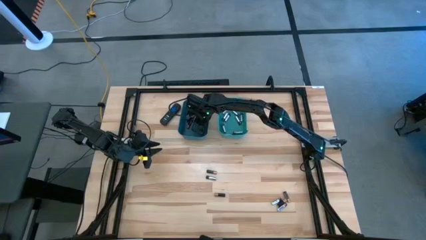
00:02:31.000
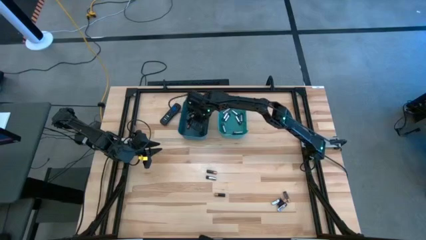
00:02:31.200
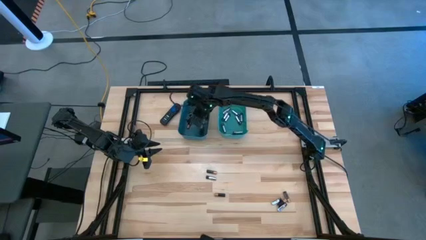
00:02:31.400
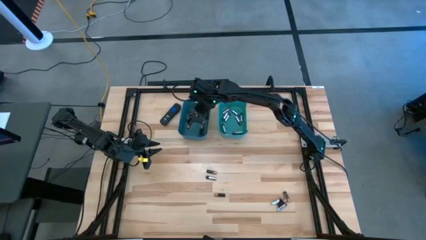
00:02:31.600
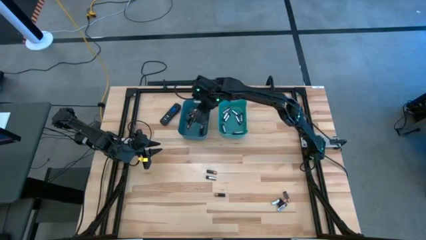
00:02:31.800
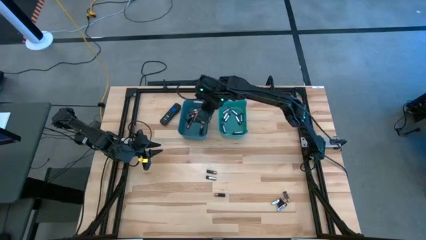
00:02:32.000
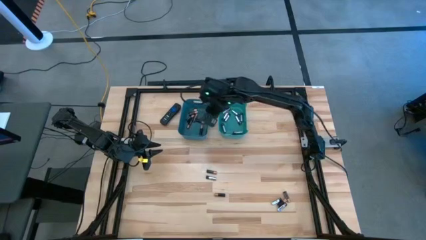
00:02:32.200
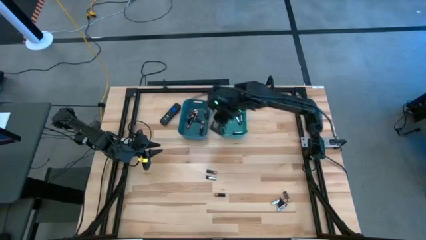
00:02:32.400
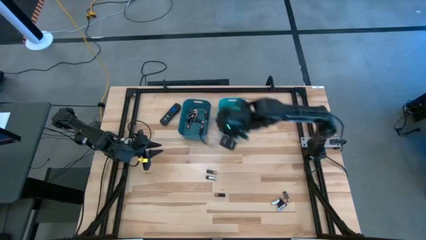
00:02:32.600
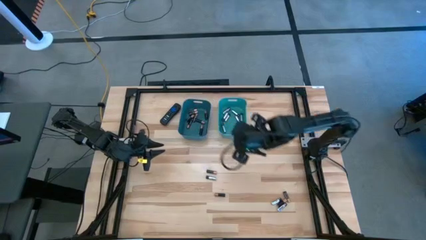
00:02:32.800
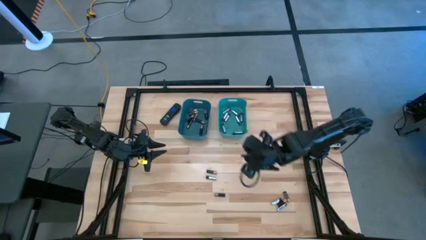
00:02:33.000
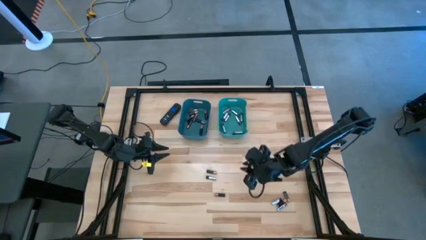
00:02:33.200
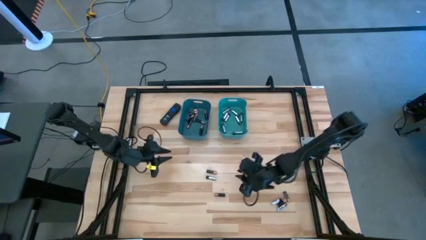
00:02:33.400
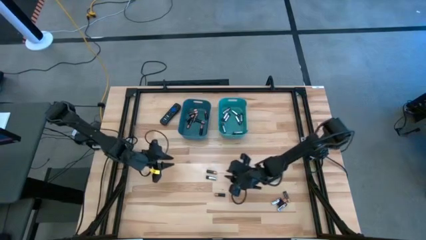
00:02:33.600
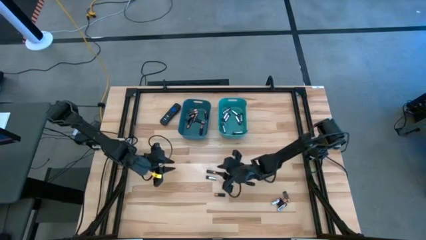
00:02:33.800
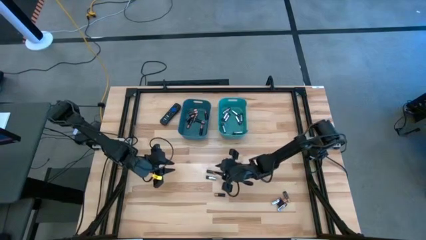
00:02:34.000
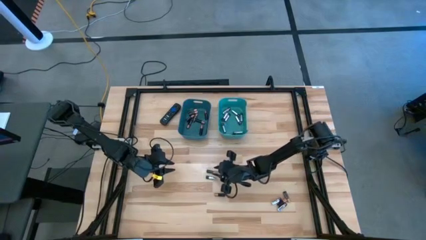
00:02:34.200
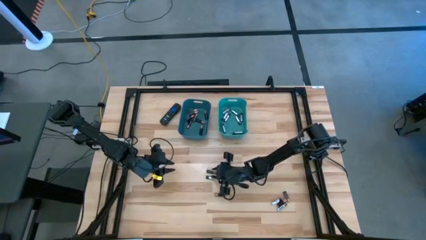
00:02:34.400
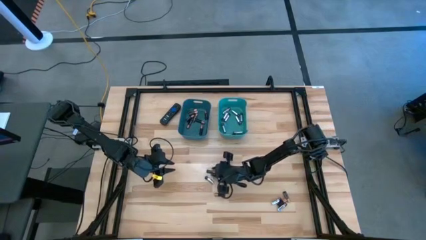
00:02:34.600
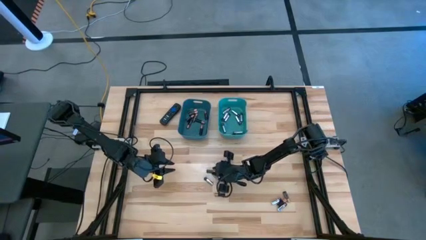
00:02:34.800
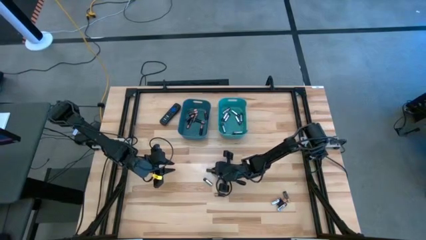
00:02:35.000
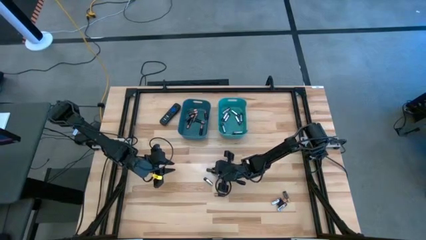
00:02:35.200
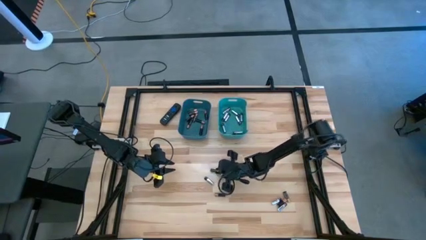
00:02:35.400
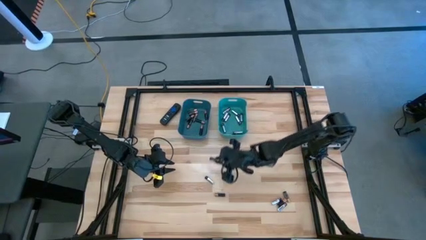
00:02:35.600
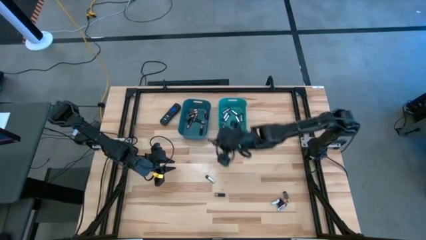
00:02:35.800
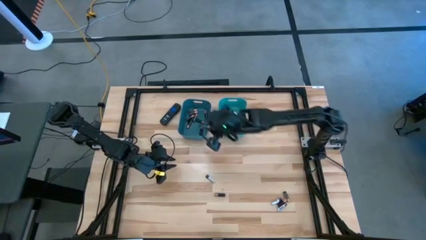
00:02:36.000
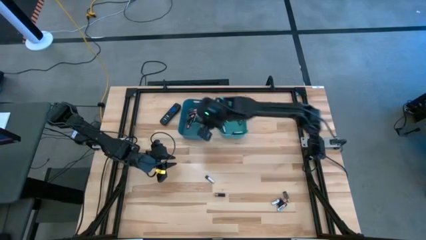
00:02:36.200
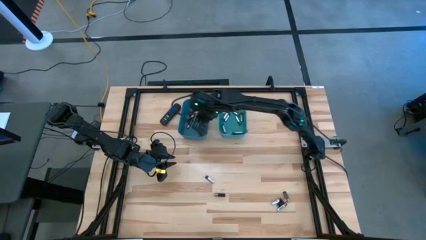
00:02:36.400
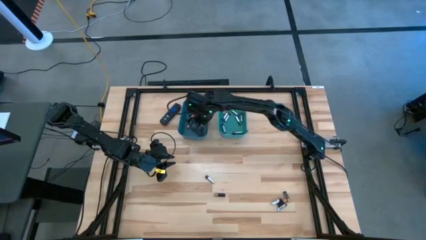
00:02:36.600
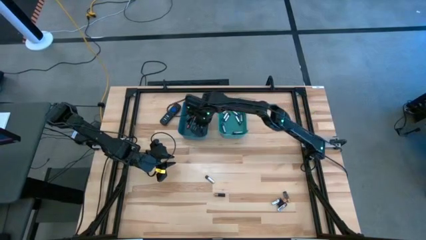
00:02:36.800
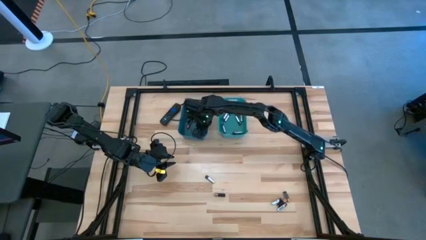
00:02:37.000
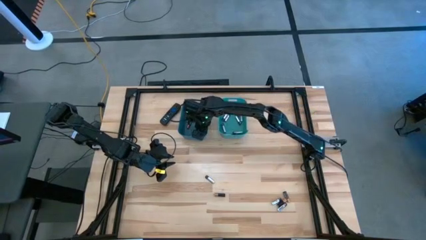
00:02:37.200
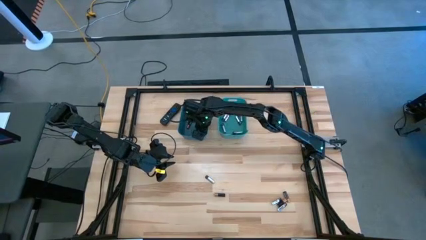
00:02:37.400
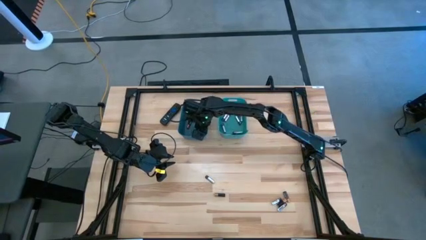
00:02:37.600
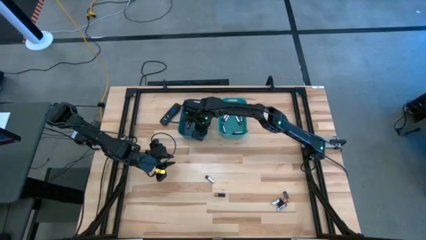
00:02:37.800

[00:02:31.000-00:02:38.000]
Task: Sort batteries
Put the black battery into the blue bin

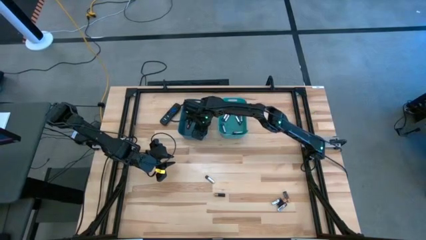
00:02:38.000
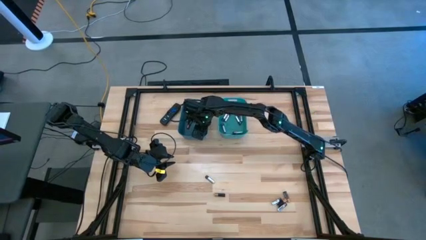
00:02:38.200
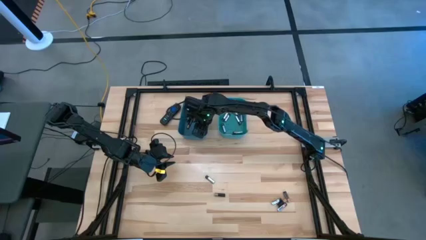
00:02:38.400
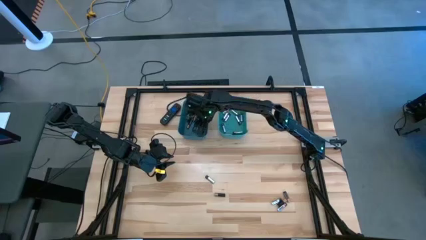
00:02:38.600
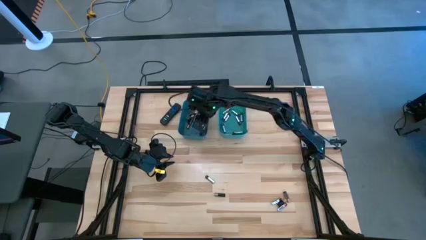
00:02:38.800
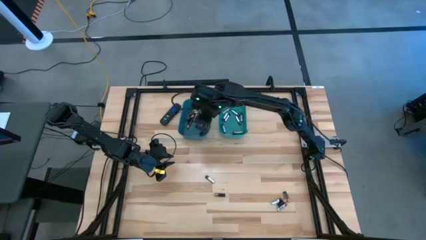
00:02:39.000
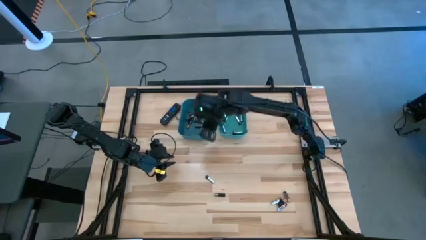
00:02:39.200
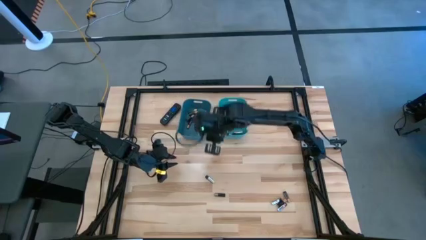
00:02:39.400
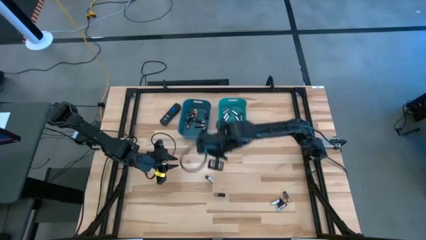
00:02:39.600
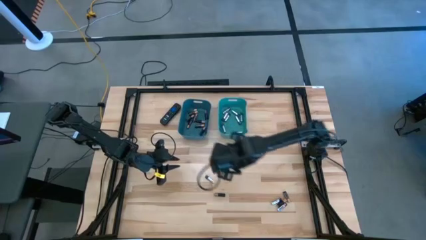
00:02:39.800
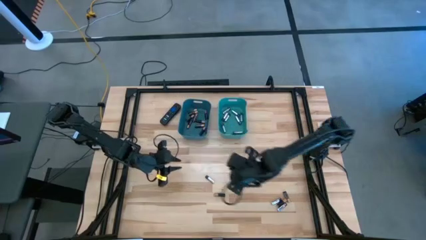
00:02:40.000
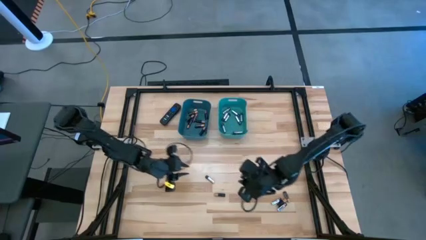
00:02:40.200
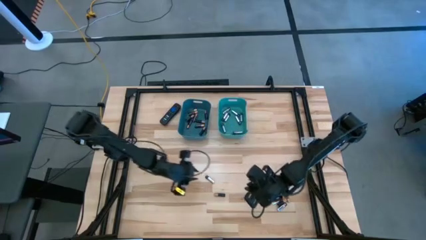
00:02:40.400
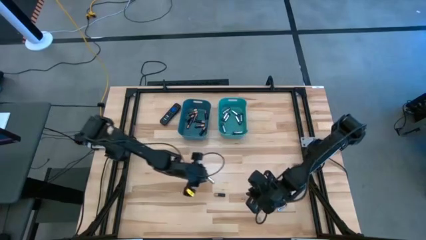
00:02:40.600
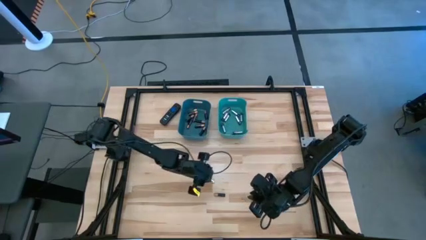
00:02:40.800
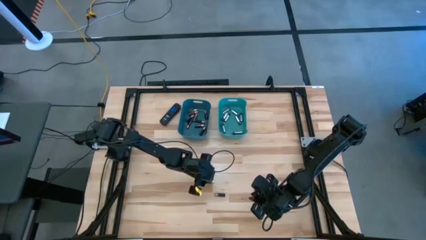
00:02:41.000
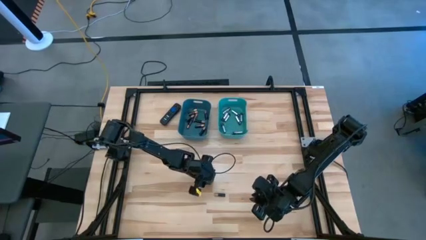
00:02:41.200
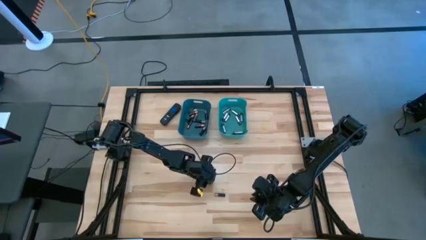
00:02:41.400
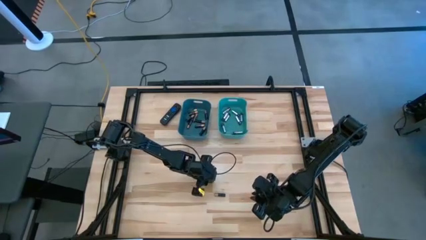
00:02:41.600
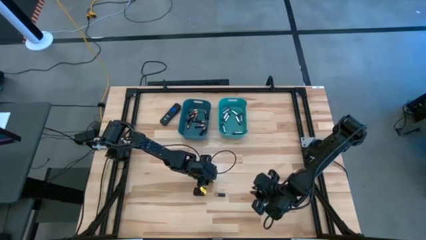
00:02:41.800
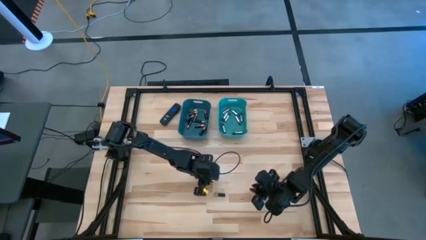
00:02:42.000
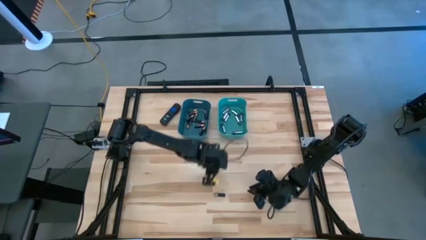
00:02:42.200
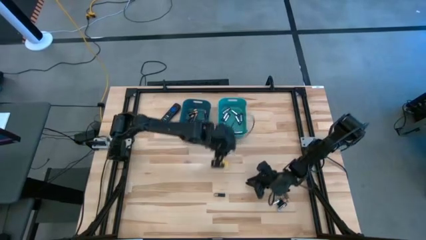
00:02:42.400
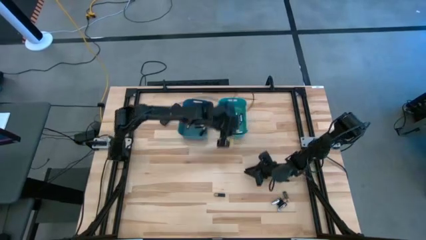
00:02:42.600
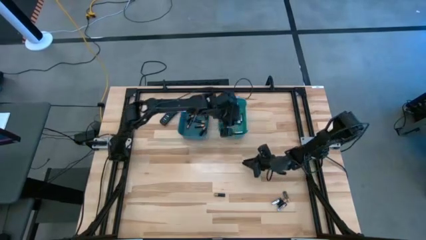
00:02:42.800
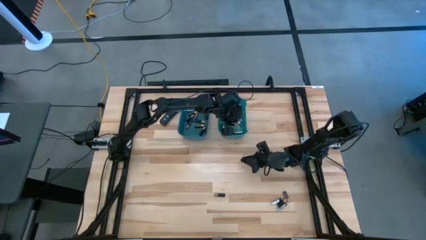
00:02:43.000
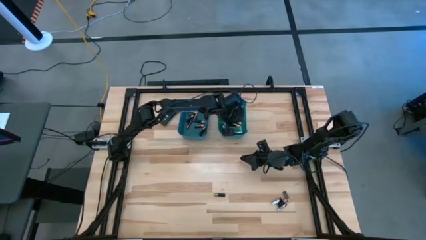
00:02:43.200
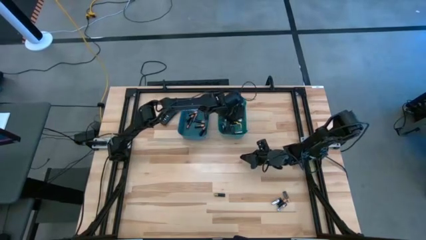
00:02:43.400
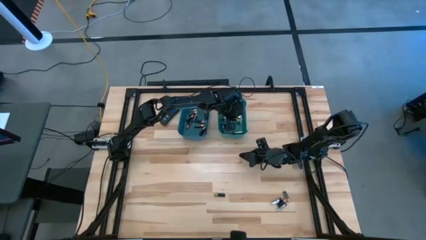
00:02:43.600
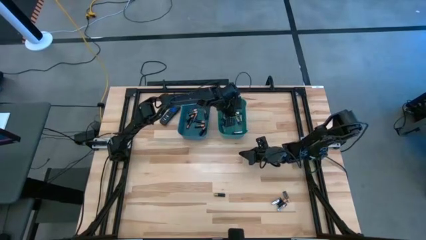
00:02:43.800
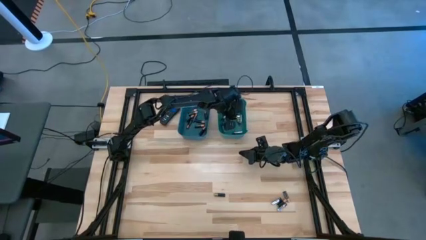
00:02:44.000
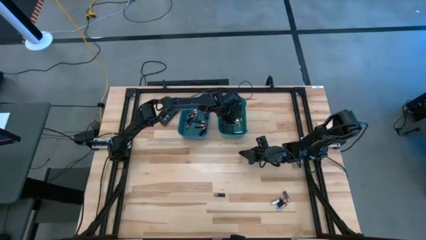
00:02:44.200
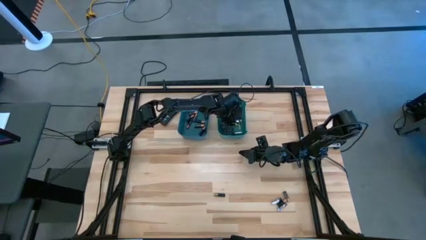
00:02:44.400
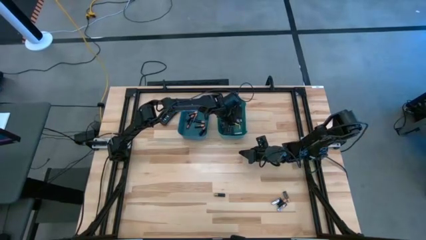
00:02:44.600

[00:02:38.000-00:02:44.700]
Put the silver battery into the green bin

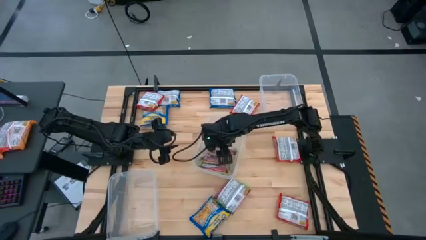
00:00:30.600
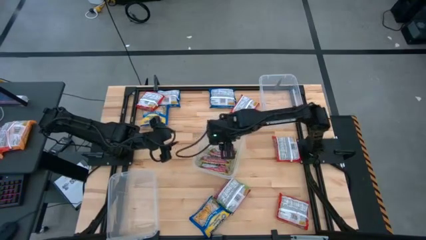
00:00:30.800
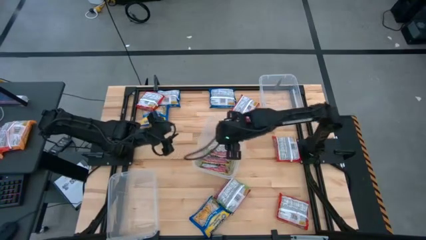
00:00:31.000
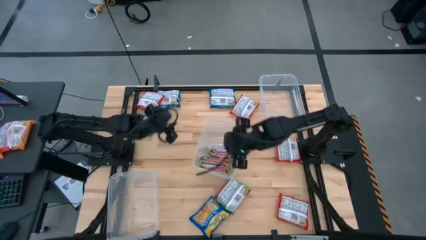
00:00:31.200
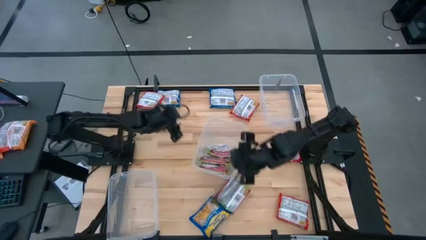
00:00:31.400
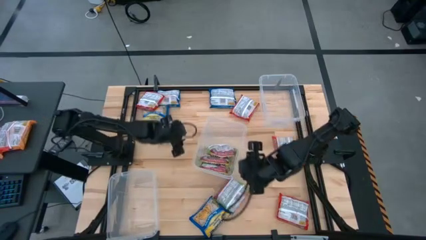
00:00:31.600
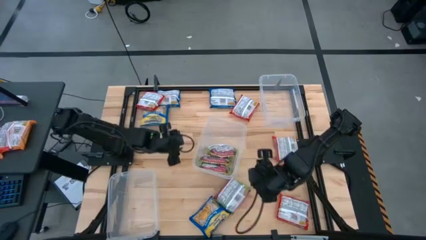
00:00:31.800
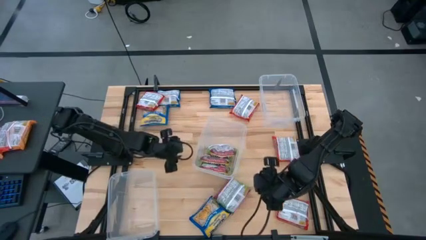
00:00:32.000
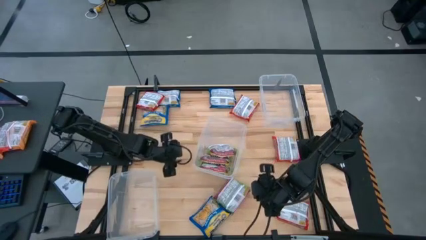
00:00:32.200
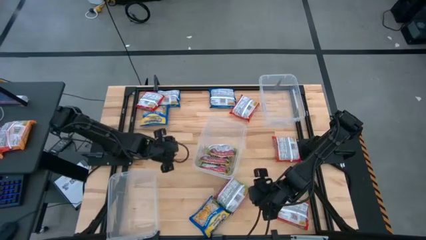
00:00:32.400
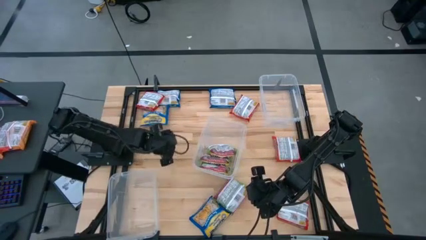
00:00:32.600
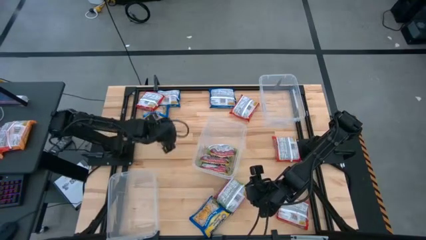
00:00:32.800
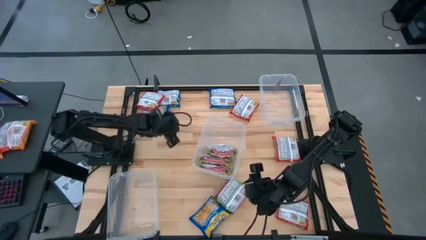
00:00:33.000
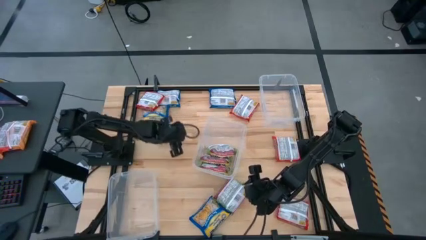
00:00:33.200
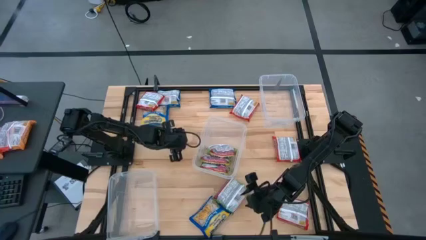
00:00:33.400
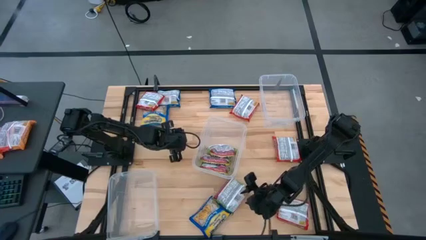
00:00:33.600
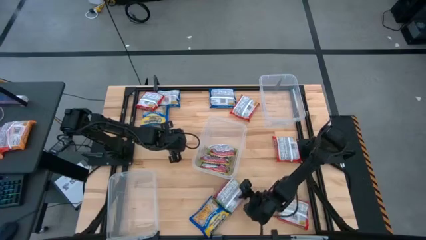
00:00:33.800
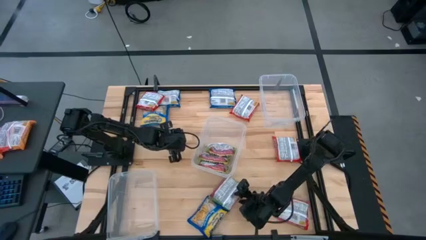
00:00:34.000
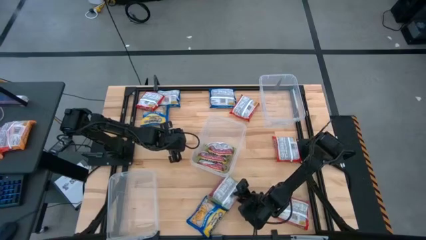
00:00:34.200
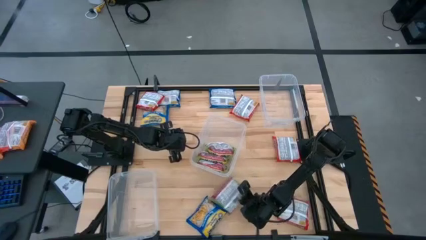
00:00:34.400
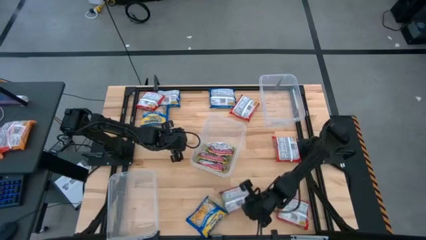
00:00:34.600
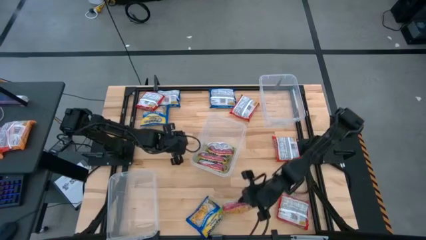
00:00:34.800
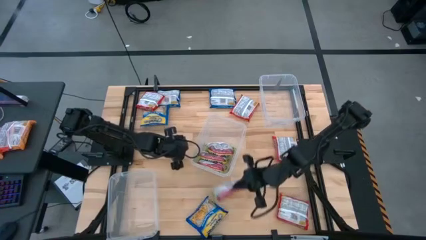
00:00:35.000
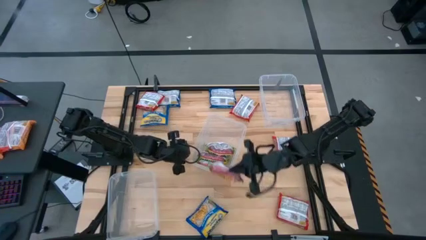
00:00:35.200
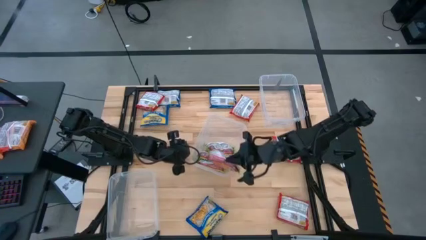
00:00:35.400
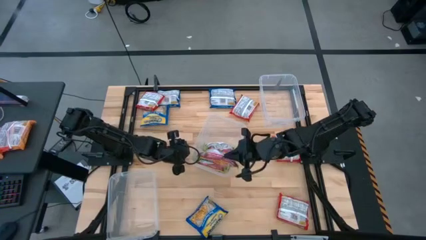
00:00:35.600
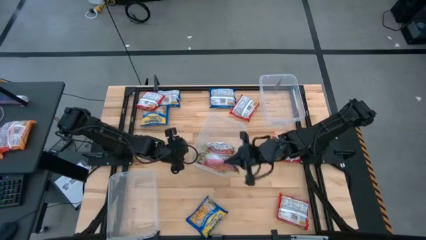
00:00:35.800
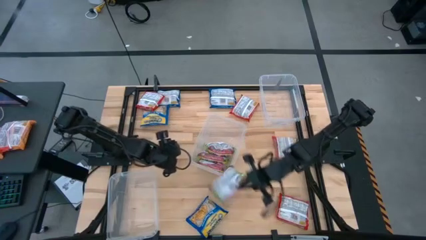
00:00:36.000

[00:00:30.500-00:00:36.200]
Task: Sort Maruchan noodles
Put the green noodle pack into the middle transparent container
